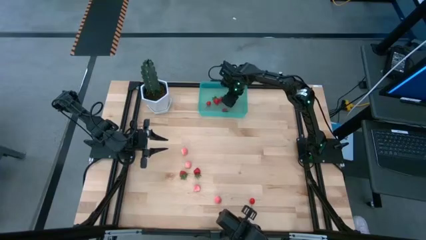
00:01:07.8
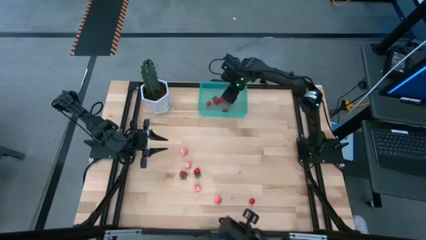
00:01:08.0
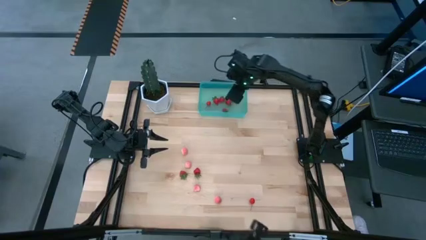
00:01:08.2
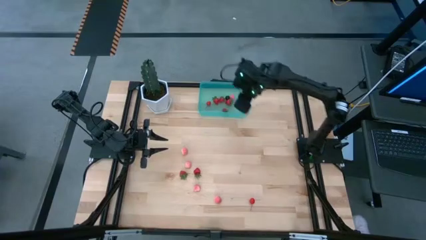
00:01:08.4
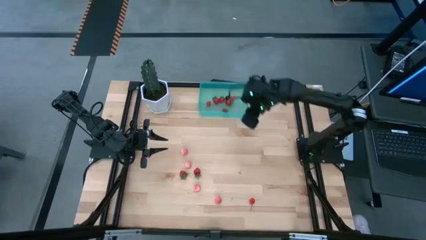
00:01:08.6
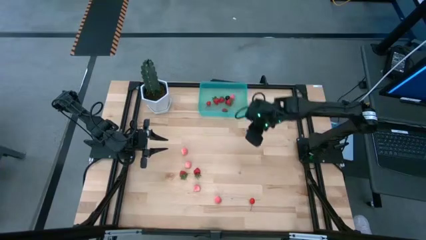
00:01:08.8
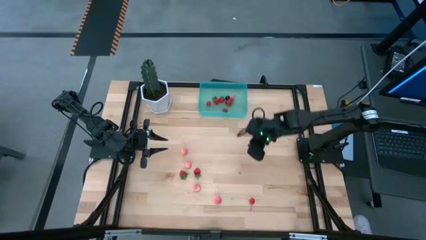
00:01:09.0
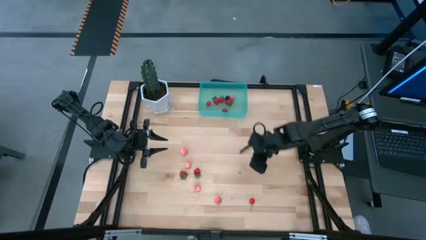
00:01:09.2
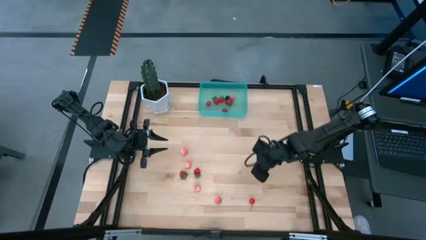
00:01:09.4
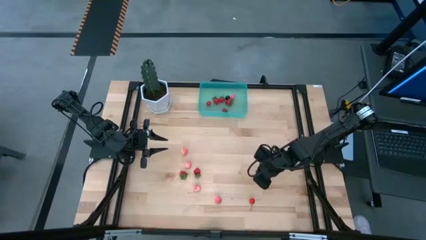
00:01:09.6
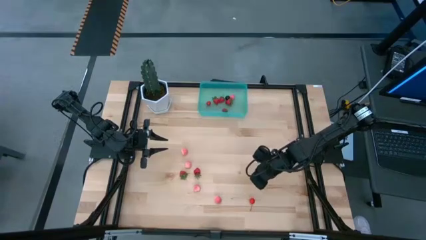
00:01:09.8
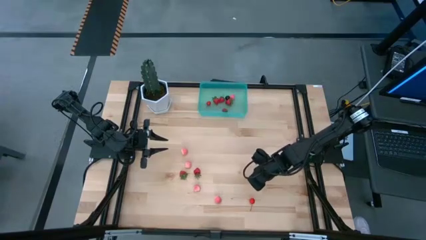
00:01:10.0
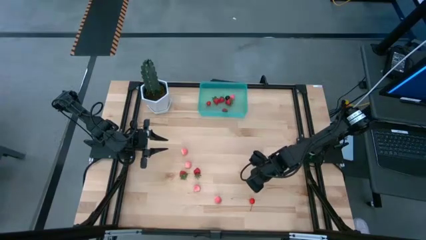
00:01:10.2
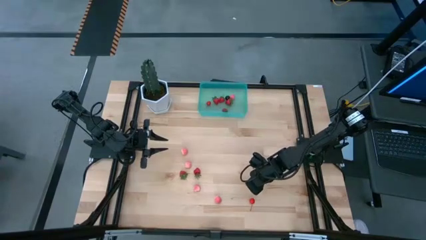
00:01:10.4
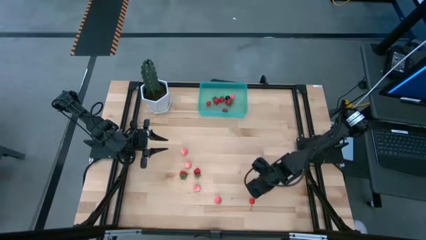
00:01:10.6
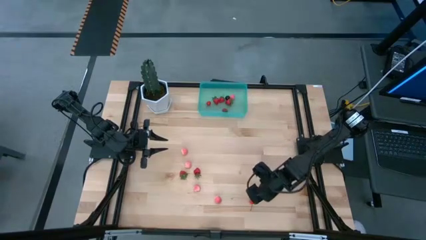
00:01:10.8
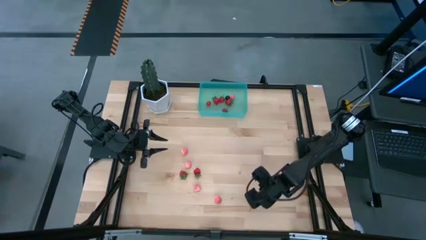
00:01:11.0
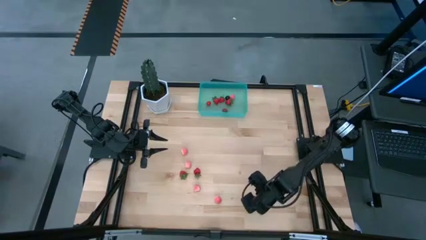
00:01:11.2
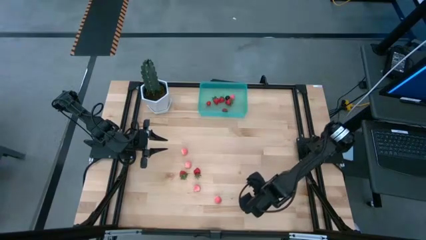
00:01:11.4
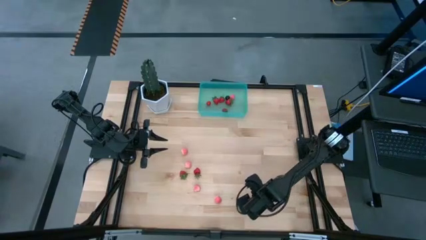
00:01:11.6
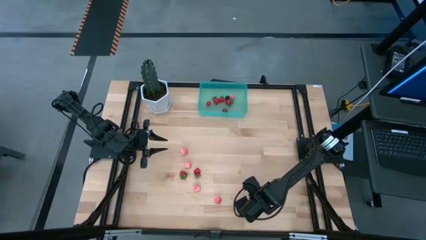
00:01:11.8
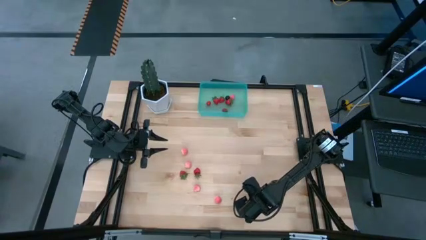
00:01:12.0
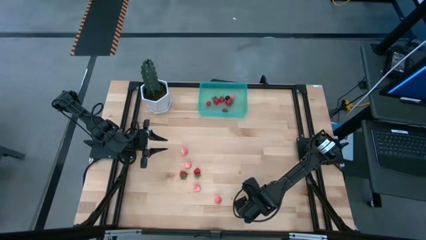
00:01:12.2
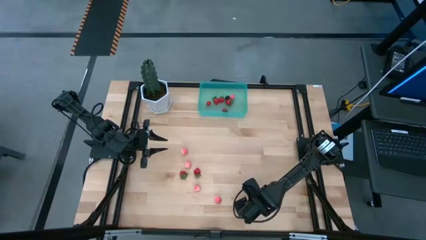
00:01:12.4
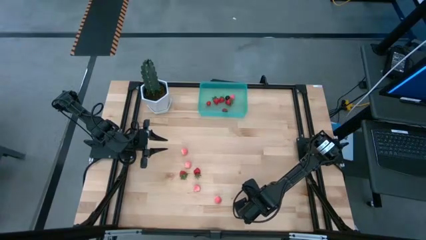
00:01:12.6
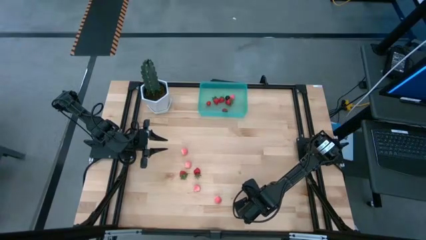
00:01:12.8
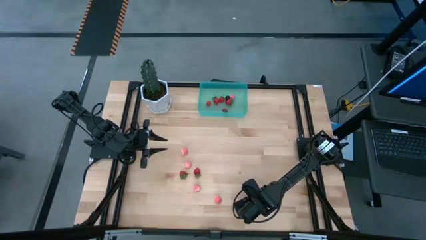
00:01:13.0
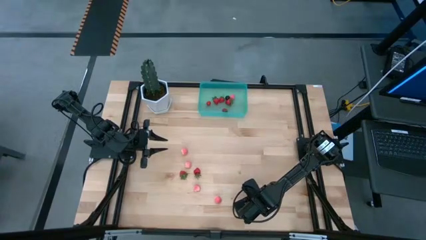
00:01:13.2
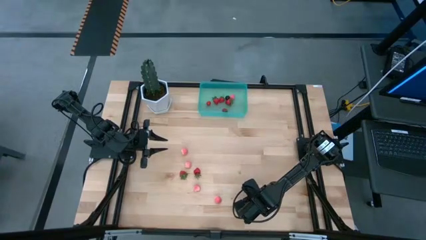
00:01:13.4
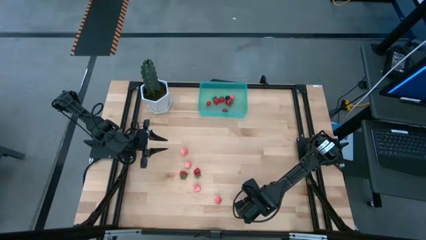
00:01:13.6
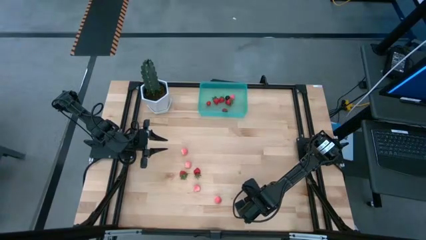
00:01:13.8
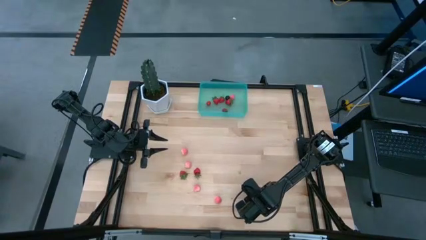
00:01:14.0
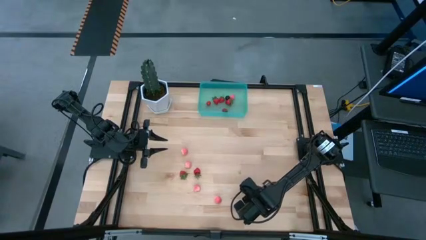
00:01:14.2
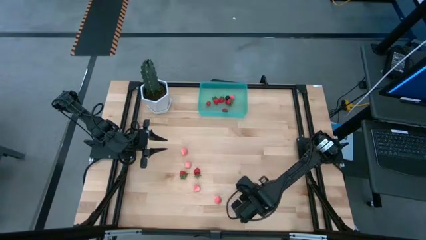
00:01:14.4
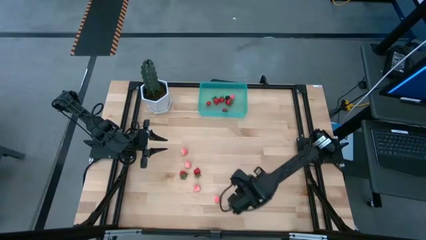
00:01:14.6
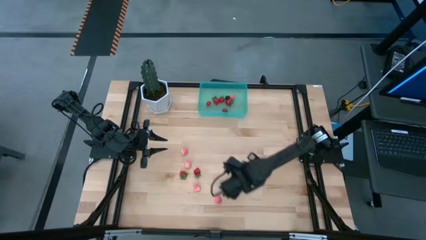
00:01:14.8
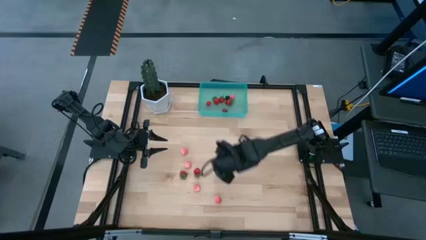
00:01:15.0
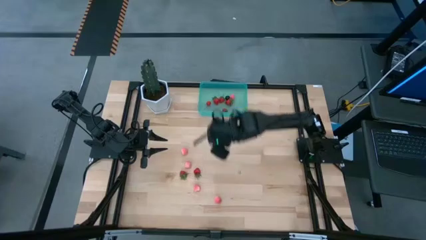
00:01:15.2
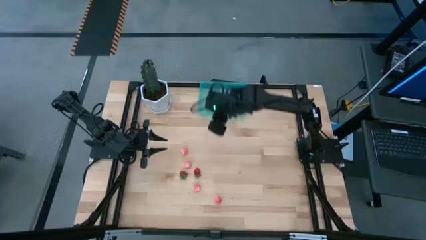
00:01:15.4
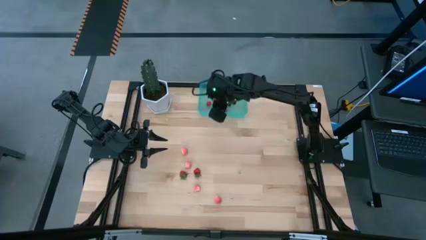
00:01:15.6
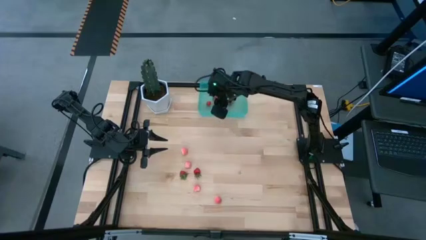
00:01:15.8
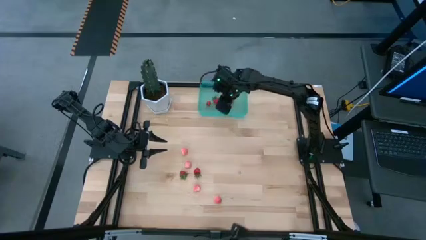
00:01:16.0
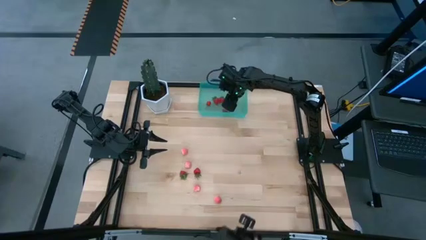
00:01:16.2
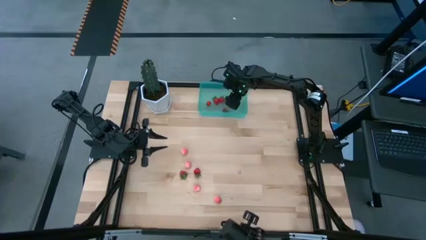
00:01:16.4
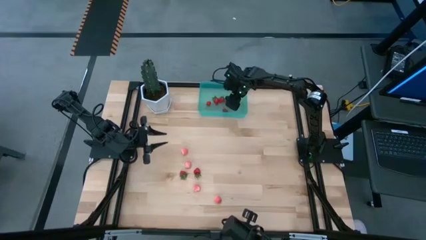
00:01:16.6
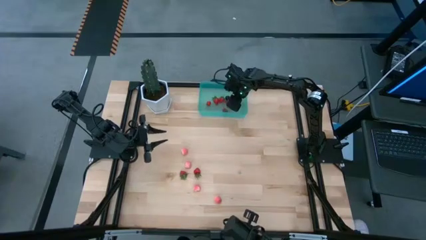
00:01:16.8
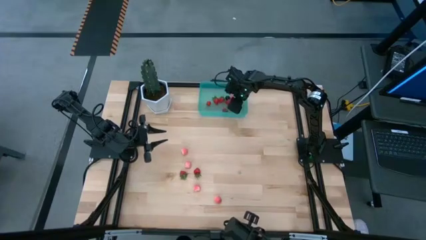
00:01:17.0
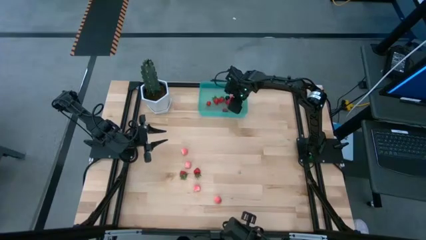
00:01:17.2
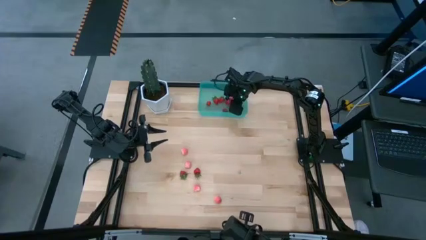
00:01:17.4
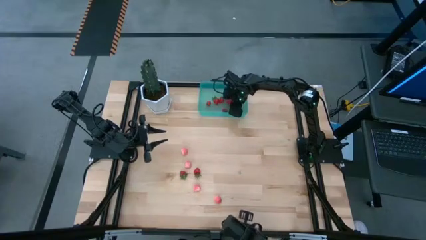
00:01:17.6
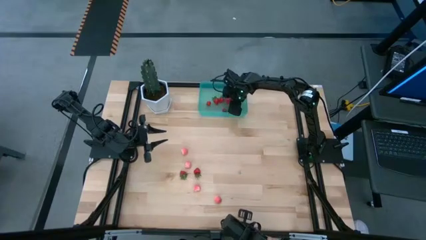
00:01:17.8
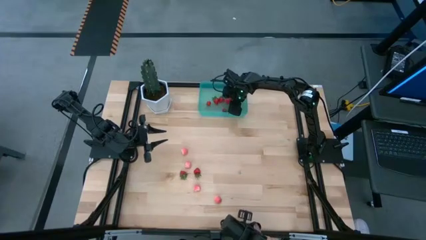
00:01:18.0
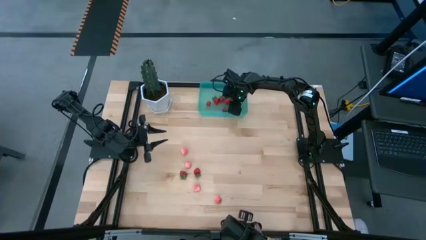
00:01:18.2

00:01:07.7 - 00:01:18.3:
Task: Pick and placing Produce into tupperware
Put the red cherry into the container

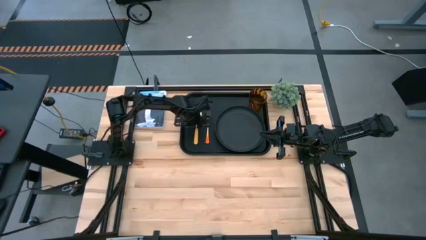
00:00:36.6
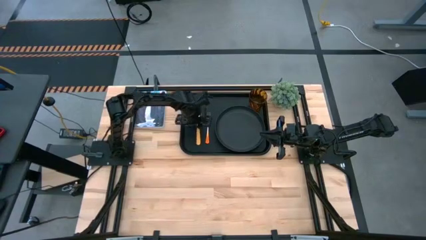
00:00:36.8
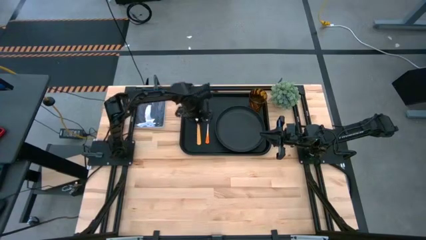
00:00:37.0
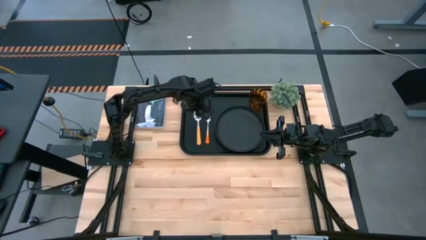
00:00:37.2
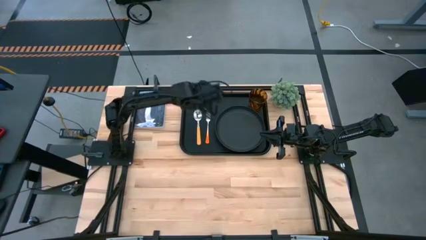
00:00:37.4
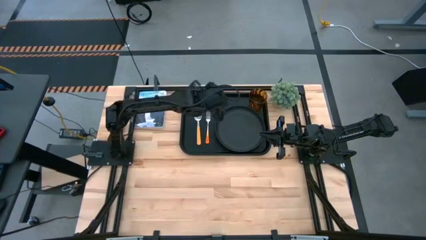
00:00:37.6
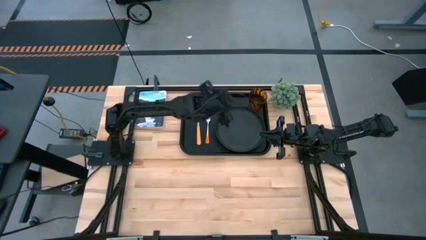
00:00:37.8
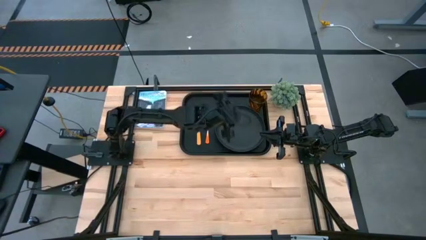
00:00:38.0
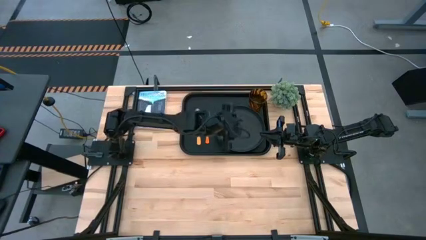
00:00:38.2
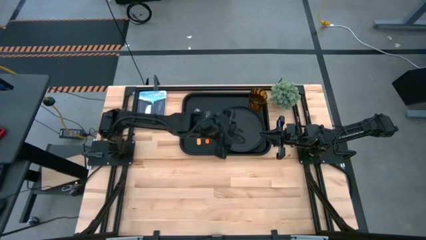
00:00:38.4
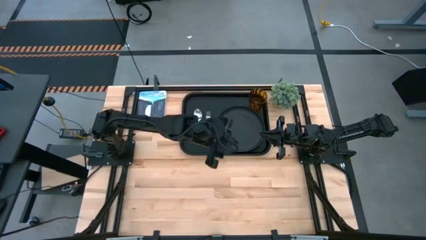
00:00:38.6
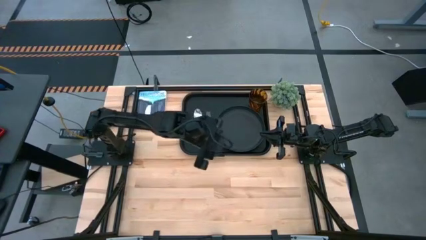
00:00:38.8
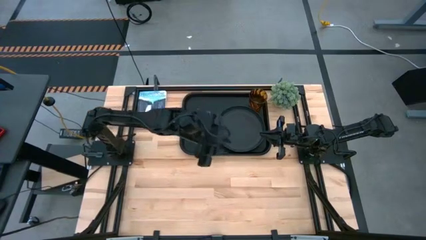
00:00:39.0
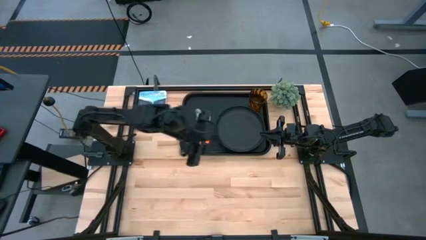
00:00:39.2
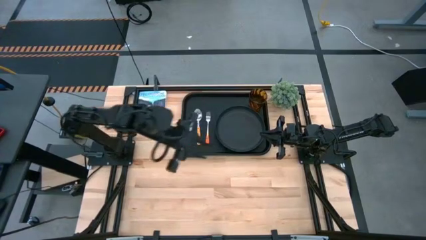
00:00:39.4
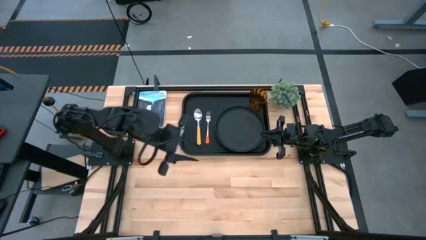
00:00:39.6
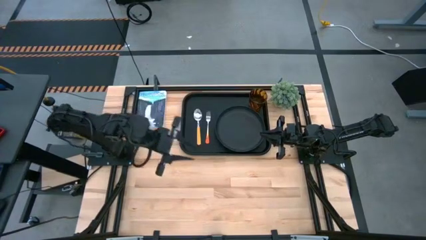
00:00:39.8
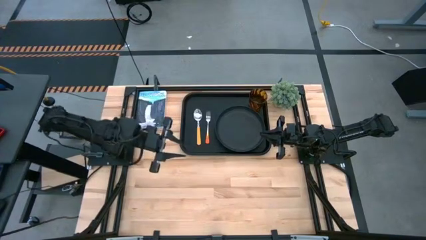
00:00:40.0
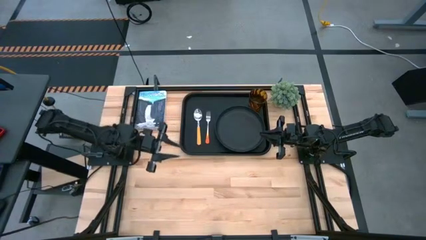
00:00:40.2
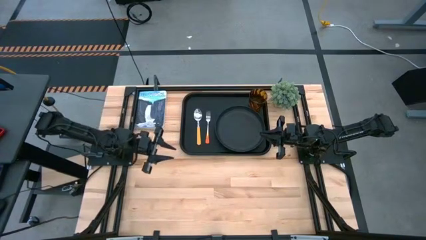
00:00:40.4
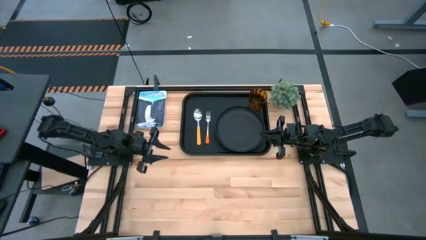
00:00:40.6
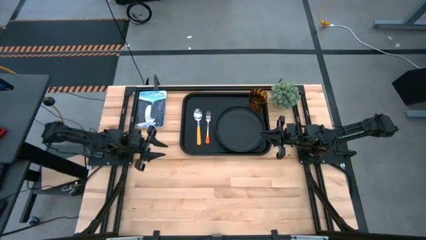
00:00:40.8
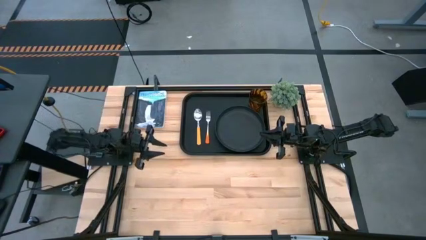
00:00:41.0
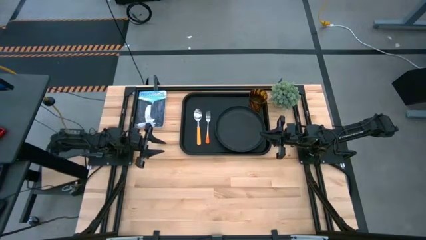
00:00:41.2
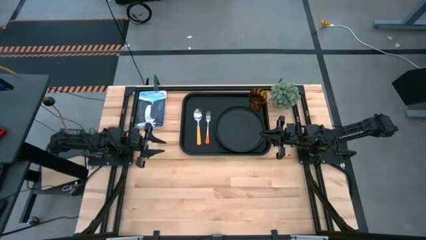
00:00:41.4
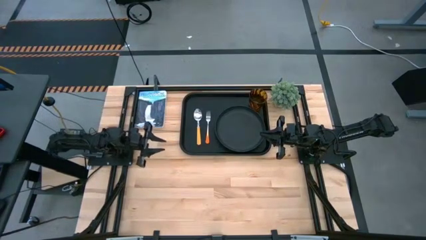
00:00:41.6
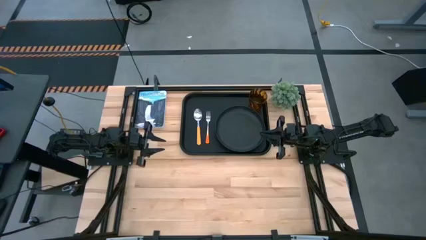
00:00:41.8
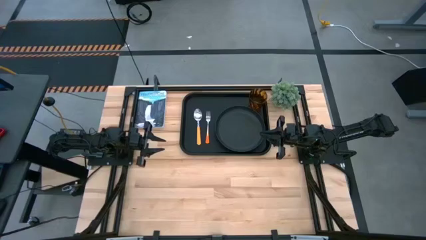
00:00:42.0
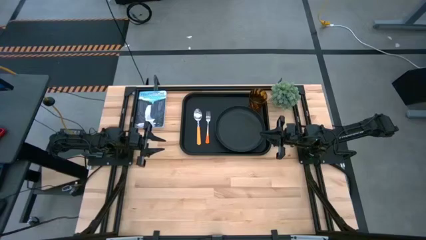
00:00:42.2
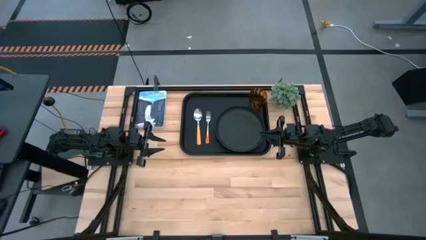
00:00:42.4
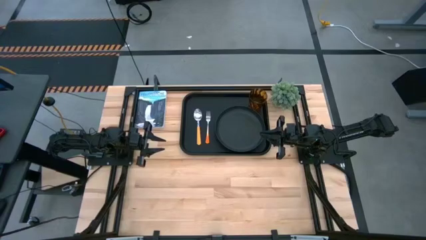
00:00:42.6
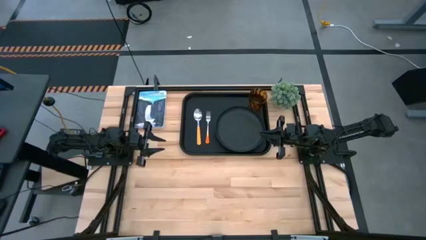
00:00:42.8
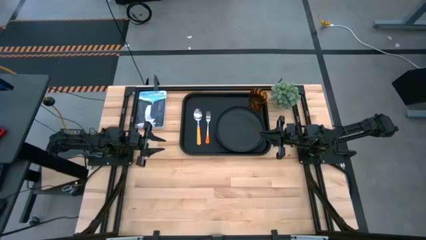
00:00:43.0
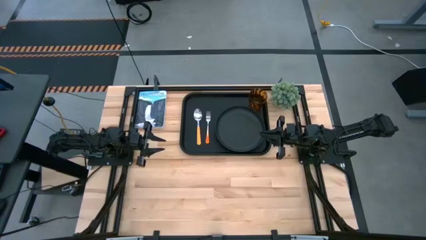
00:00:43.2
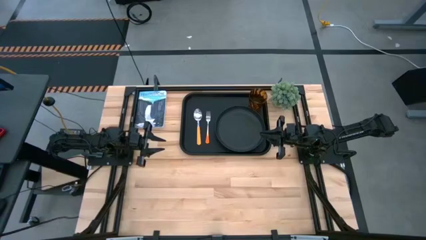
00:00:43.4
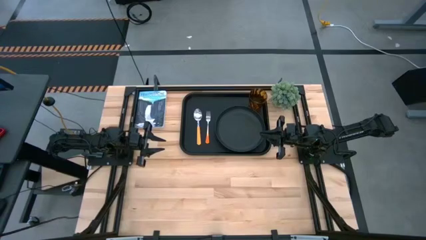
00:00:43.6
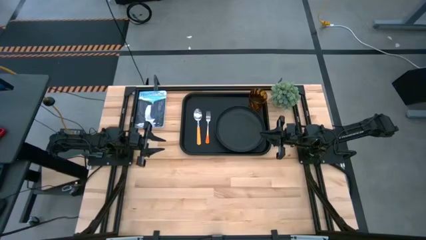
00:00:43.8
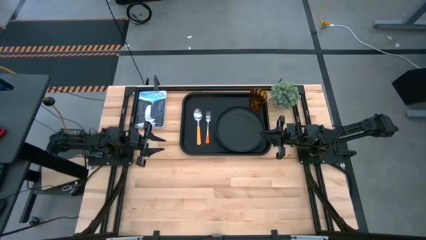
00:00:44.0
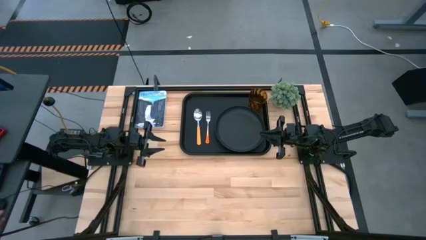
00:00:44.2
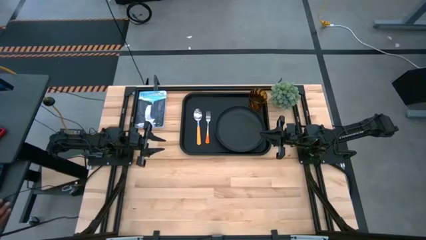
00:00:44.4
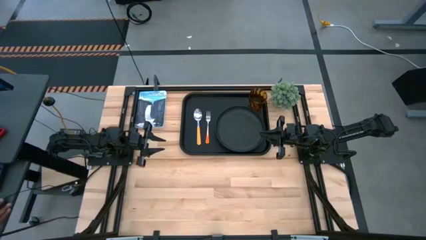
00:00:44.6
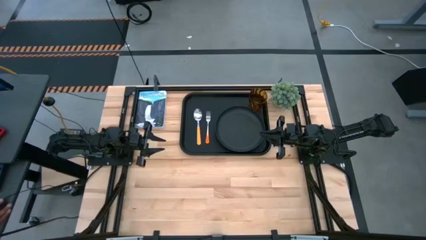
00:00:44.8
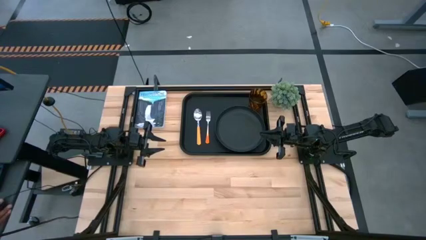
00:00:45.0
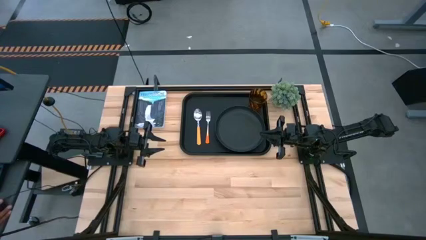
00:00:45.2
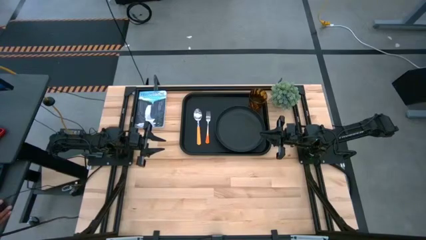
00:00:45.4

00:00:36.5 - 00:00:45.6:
Task: Pick and place plate/cup/fork/spoon on tray
Return to Home Position
